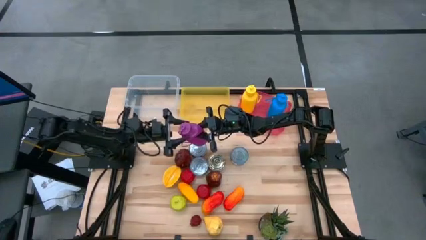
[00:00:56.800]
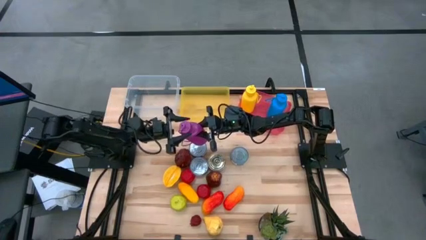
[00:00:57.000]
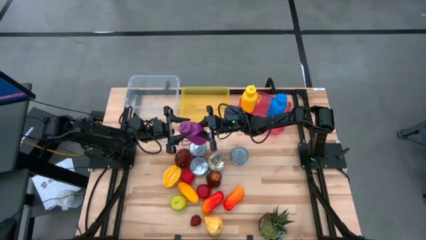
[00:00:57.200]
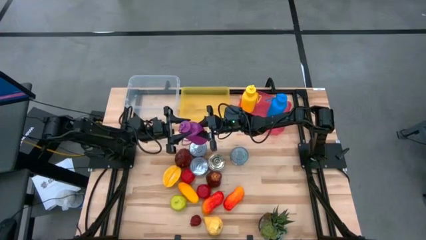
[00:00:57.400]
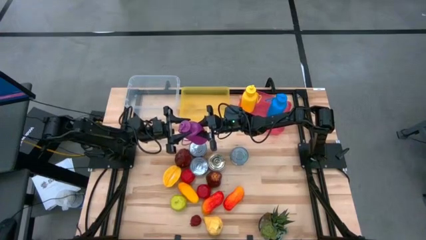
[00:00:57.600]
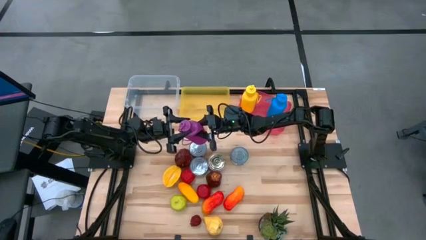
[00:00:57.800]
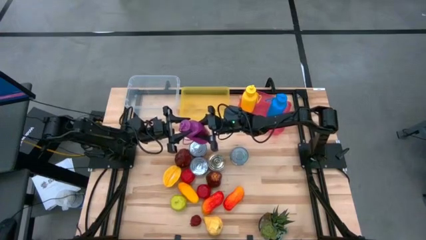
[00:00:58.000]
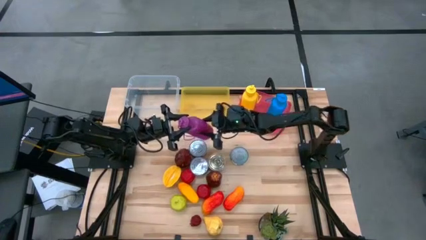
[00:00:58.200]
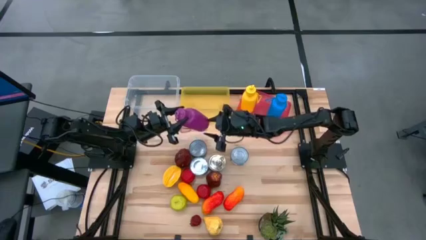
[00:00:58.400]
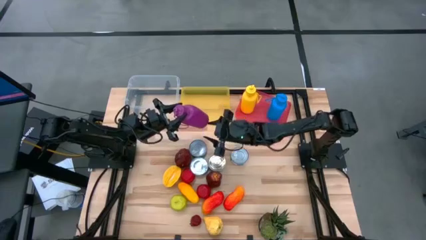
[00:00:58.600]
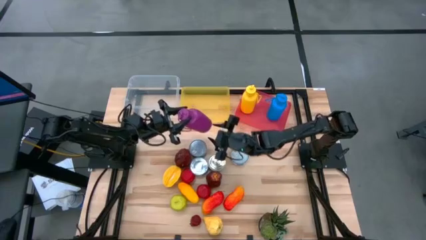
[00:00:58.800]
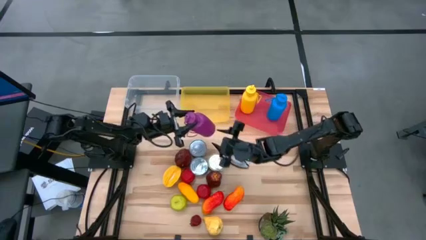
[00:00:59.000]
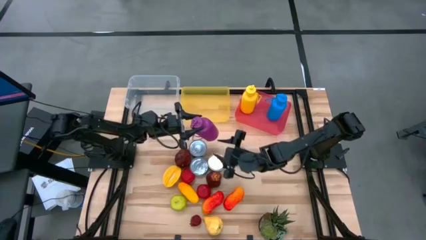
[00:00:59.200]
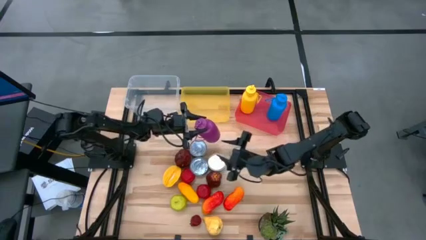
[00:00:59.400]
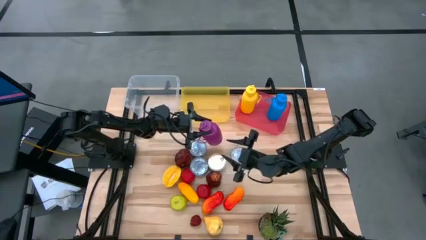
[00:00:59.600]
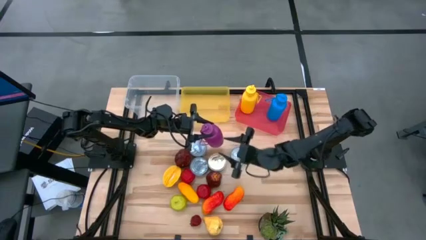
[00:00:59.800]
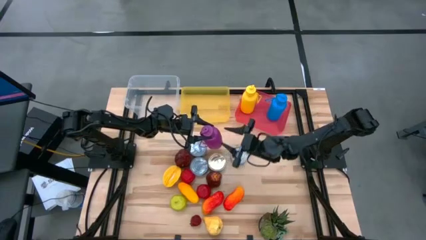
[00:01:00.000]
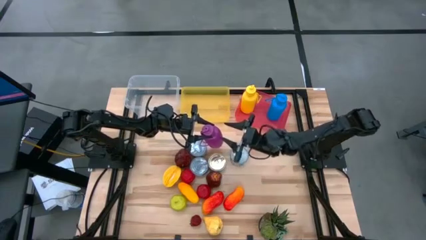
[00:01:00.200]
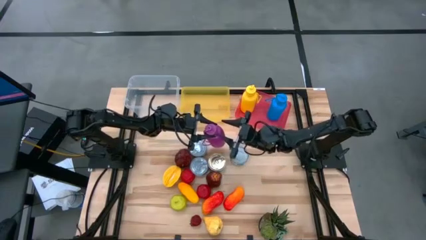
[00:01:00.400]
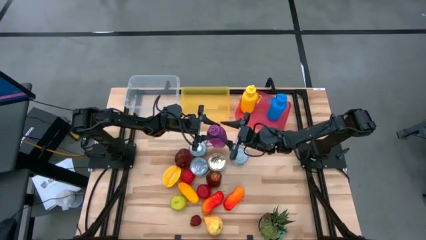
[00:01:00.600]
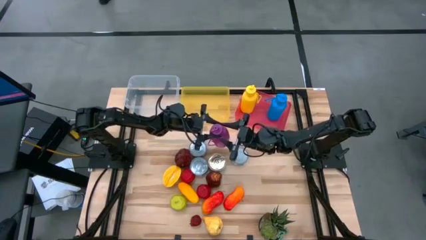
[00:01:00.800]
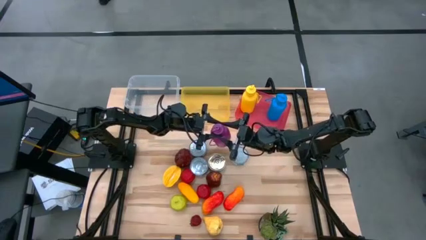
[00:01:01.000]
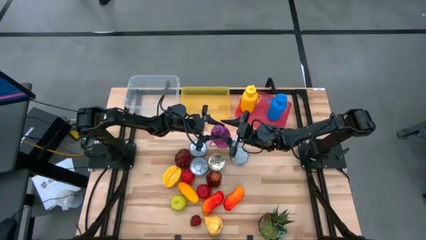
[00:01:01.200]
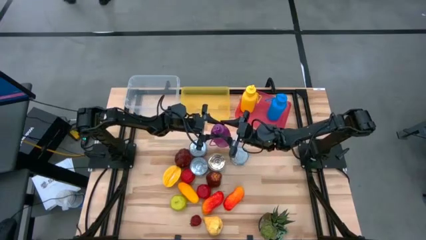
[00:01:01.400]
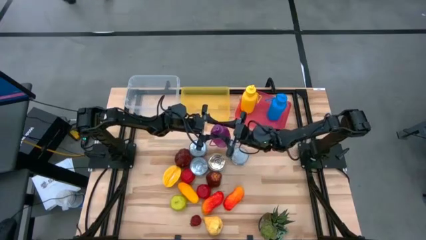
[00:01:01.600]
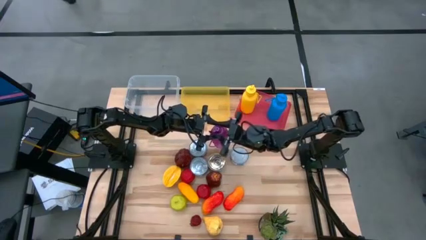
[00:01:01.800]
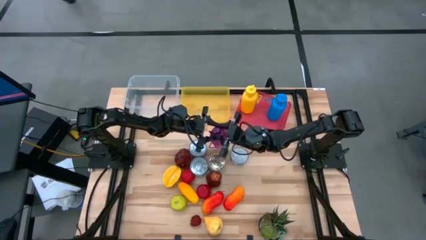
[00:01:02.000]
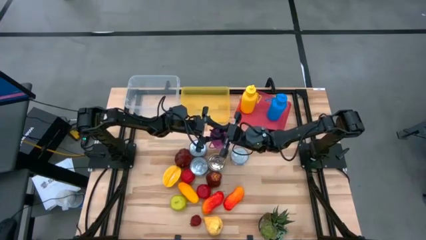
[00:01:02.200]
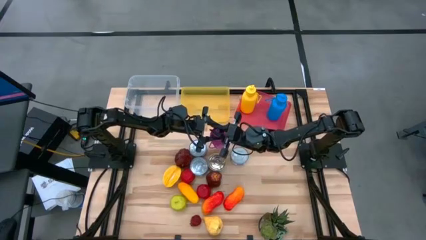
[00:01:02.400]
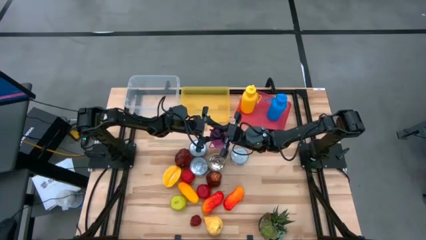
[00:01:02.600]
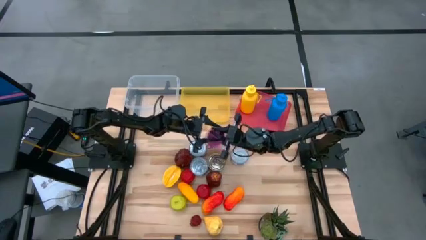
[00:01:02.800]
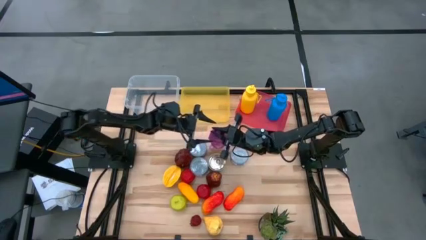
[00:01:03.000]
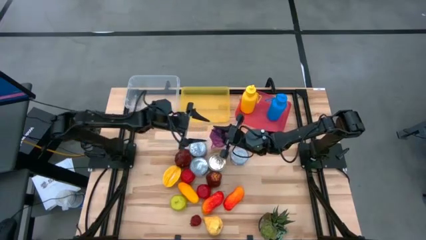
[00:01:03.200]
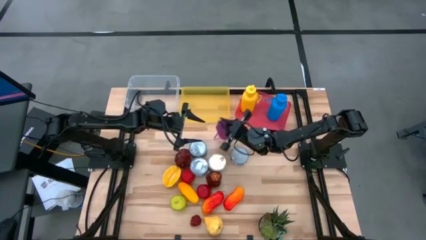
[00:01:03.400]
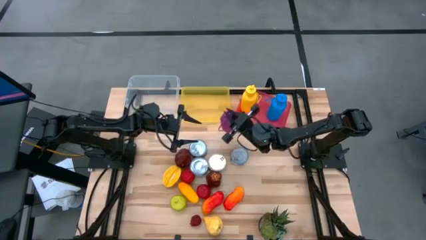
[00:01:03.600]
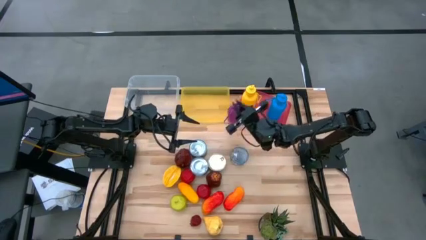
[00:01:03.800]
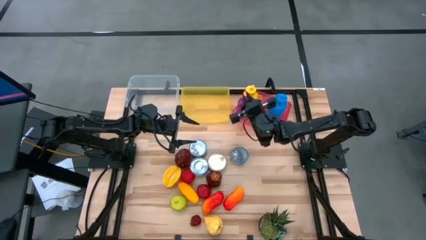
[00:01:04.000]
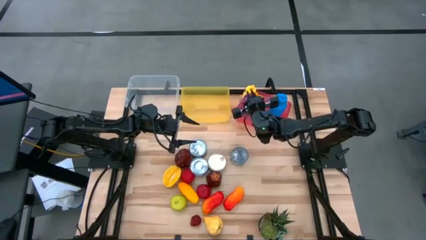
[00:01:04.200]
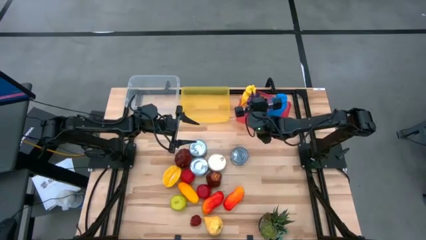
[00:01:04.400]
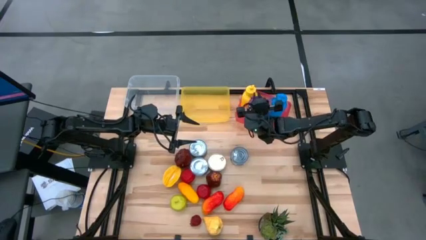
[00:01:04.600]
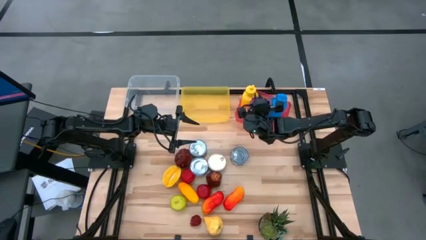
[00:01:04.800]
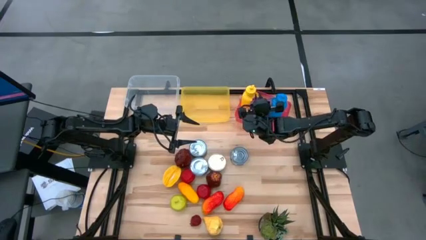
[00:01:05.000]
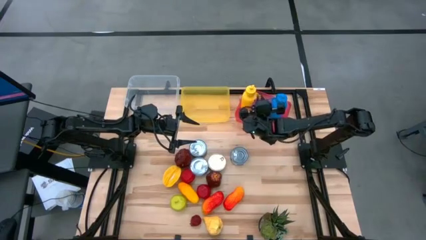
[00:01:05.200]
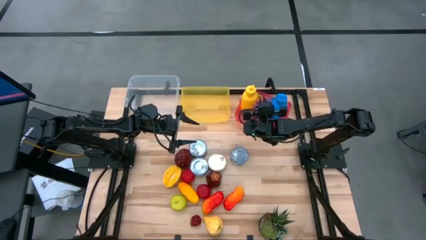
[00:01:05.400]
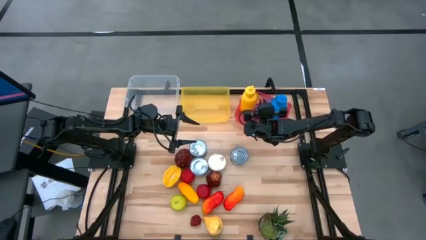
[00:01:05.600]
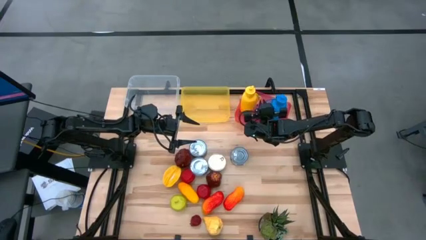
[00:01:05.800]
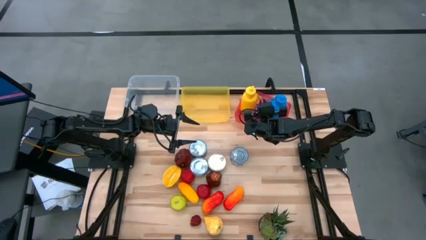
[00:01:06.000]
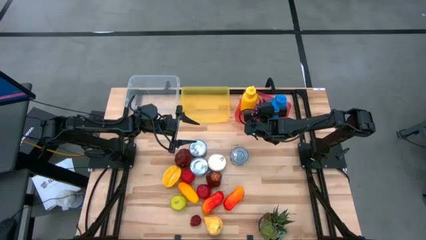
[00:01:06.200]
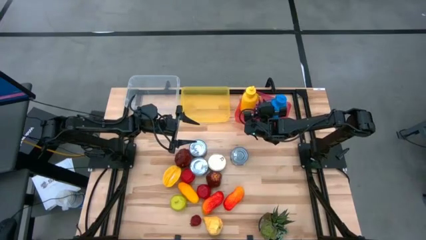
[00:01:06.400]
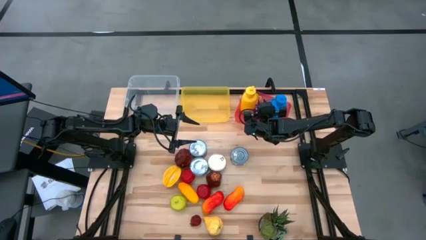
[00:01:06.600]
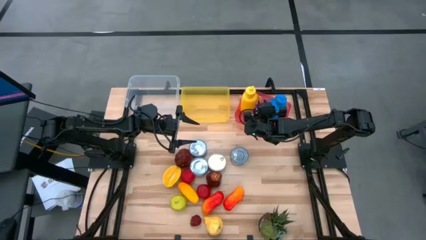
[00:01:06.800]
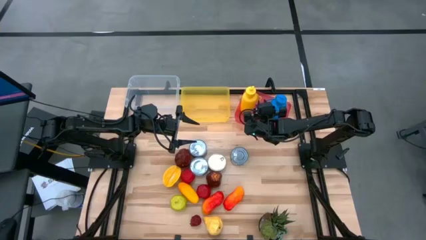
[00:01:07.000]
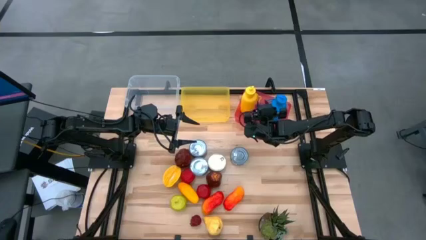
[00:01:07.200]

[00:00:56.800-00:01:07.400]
Task: Pick & Place Food Item
Put the purple water bottle into the pink bin

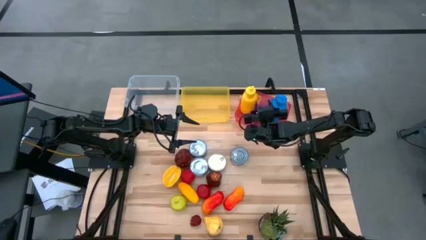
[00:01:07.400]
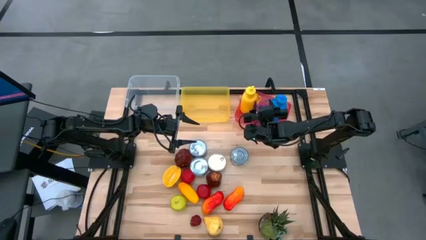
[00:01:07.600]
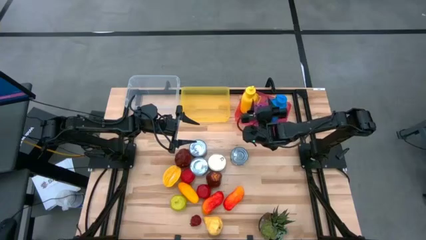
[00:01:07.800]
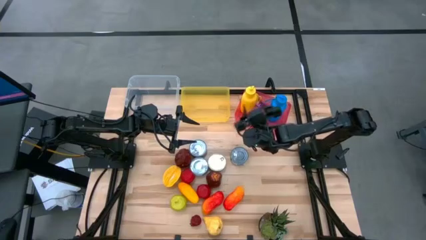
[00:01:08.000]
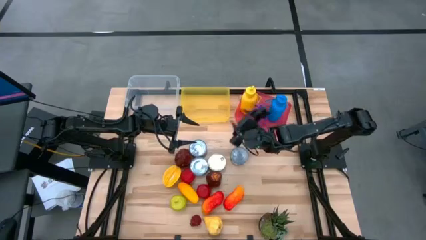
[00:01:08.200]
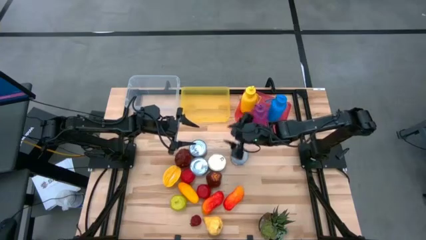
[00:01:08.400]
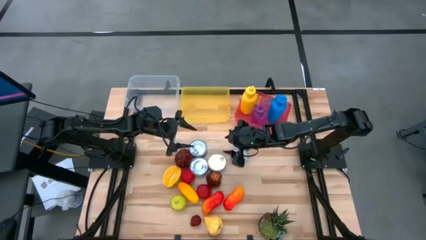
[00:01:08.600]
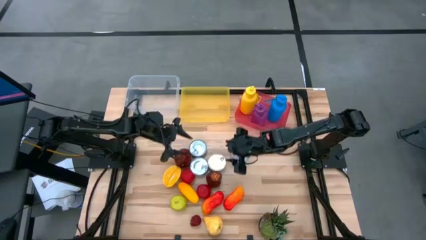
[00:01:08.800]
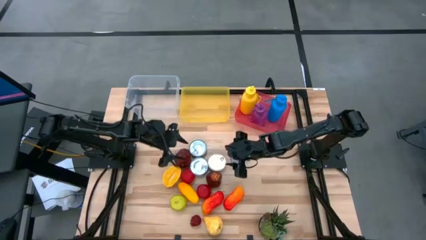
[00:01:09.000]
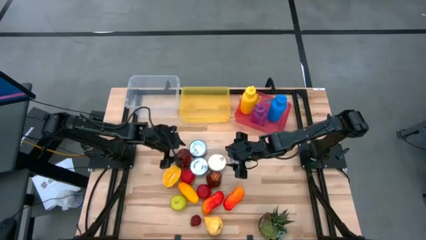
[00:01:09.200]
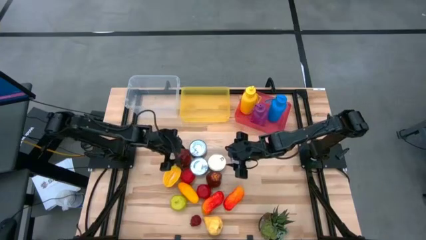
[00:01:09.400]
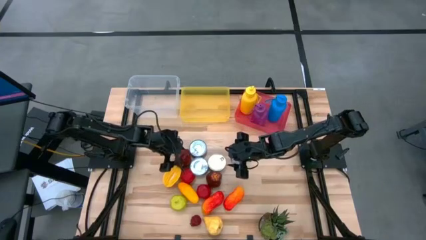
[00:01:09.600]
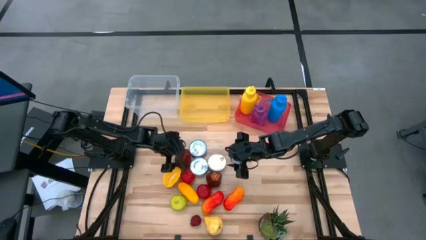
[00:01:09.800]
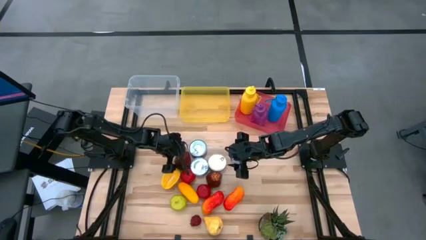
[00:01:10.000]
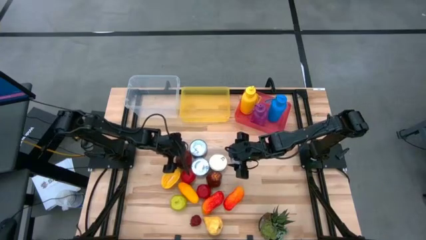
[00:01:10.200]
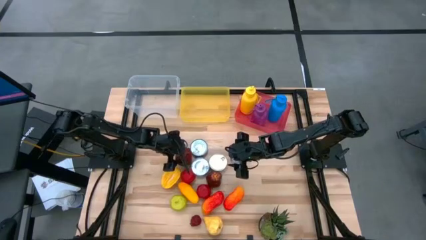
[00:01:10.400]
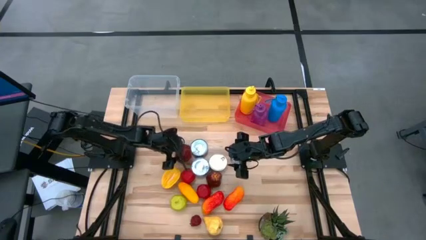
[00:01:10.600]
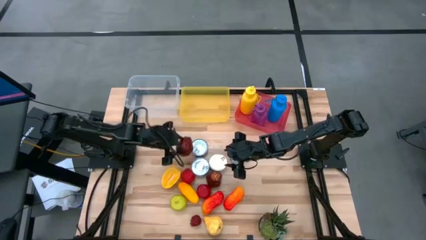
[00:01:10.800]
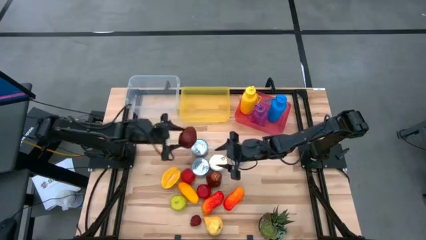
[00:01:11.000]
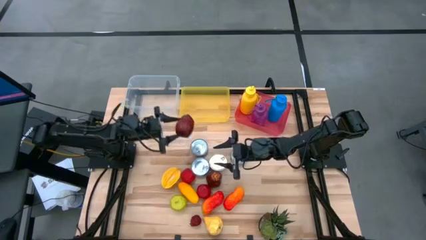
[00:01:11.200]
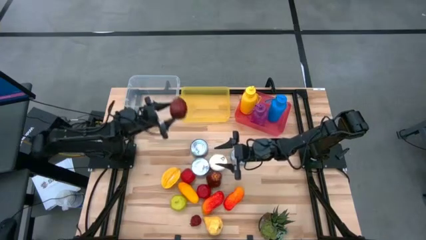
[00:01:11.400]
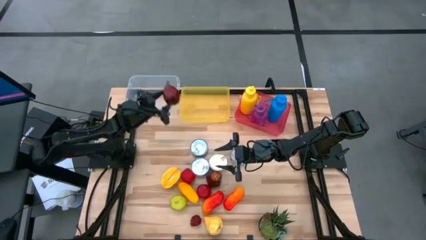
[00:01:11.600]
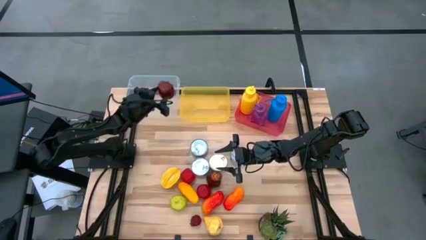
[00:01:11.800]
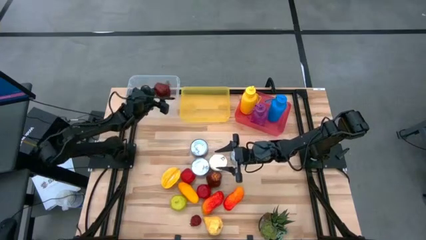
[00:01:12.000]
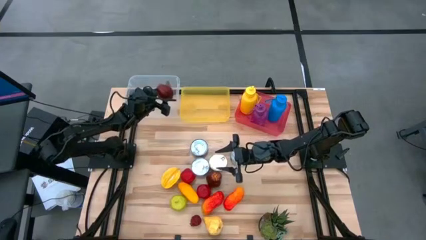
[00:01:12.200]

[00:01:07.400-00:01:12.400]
Put the top dark red apple into the transparent bin

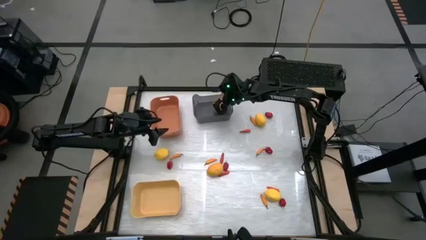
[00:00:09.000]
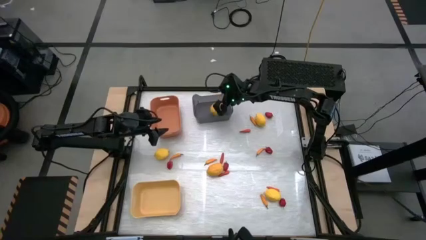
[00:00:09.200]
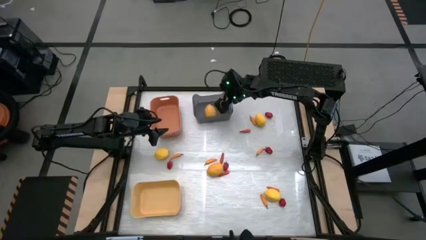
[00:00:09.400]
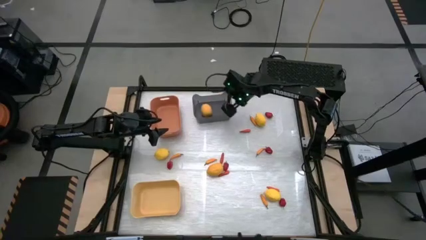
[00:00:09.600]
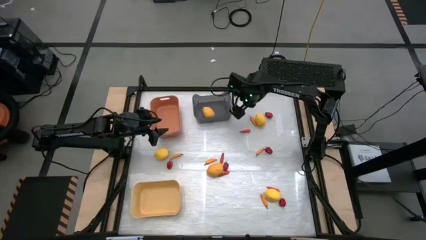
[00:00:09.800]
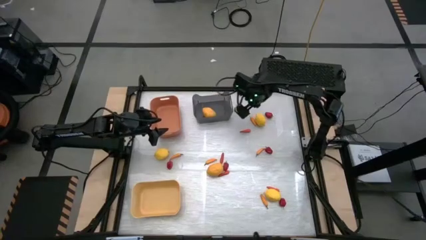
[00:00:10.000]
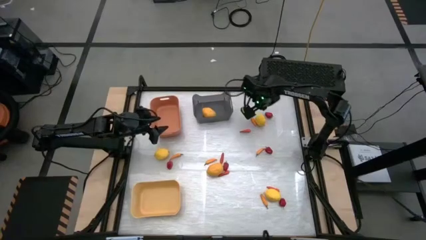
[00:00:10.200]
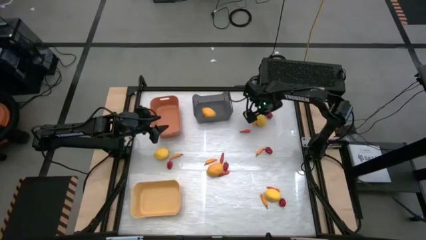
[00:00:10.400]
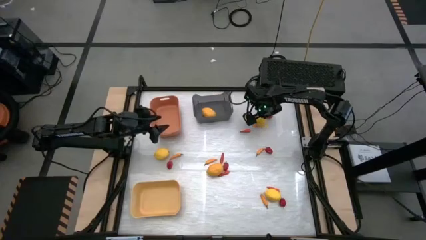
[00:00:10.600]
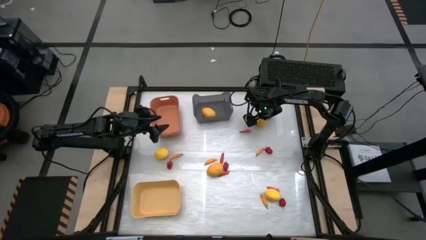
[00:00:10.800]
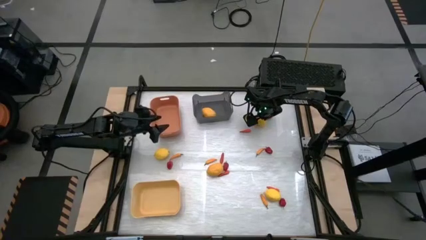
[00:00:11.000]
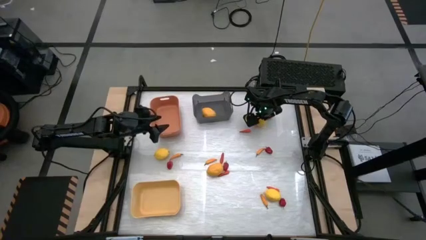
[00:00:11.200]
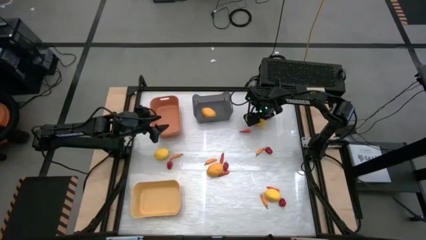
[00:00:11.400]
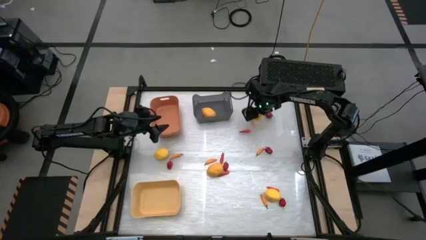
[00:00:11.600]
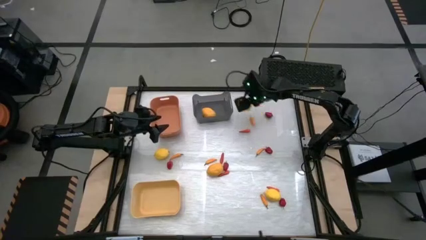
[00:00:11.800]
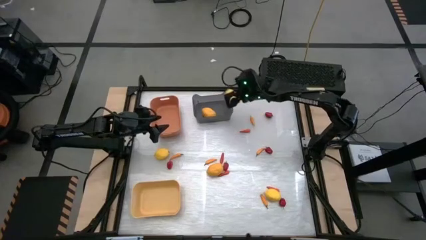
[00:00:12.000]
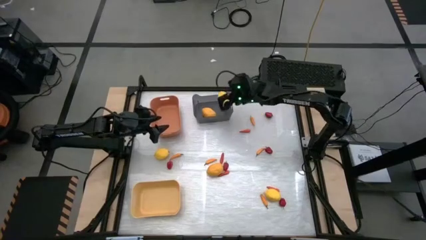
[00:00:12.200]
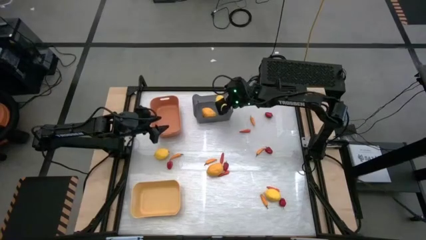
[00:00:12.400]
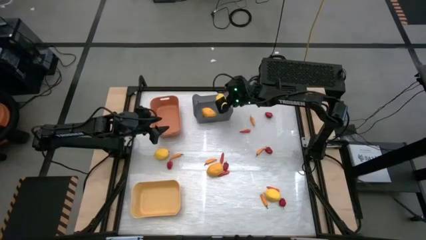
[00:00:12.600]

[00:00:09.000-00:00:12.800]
Task: Sort produce into baskets
Put the yellow lemon into the black bin
